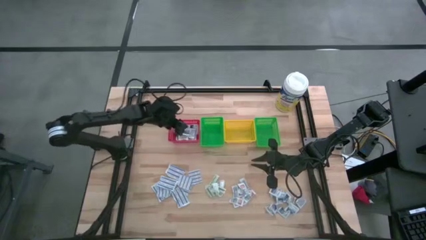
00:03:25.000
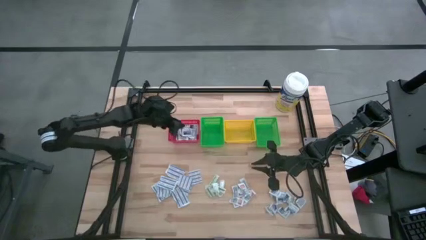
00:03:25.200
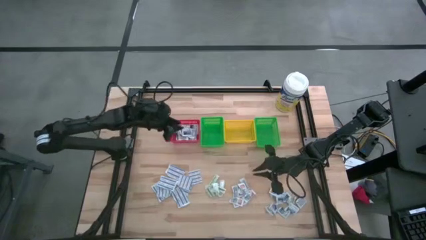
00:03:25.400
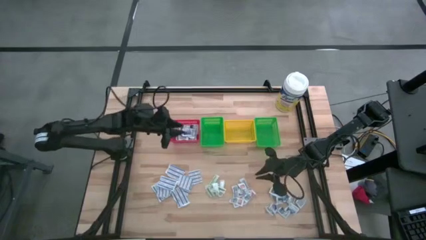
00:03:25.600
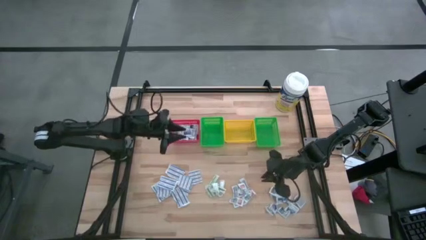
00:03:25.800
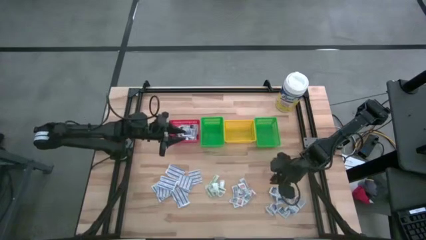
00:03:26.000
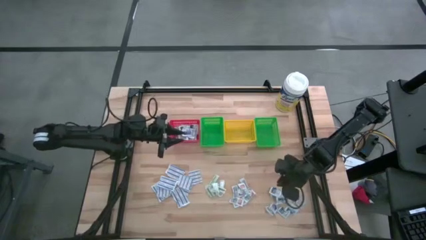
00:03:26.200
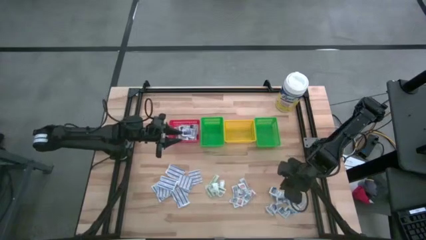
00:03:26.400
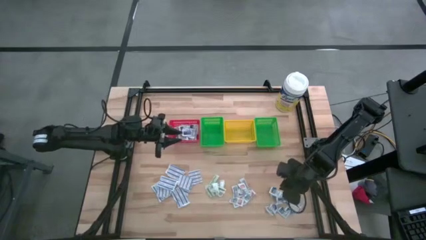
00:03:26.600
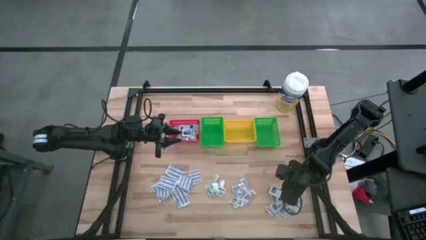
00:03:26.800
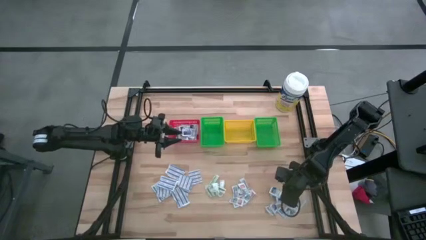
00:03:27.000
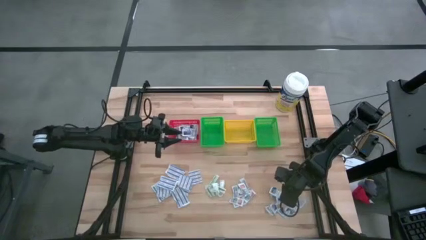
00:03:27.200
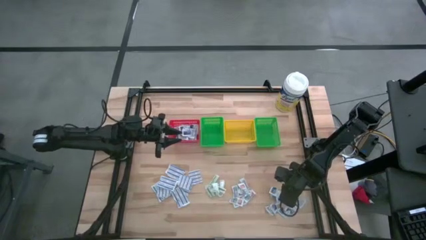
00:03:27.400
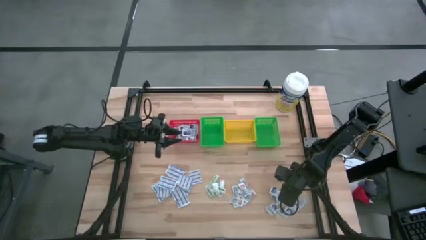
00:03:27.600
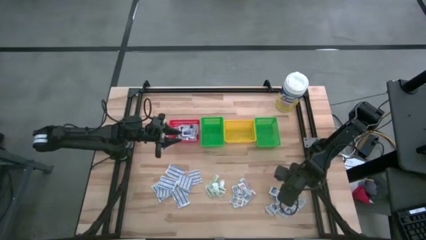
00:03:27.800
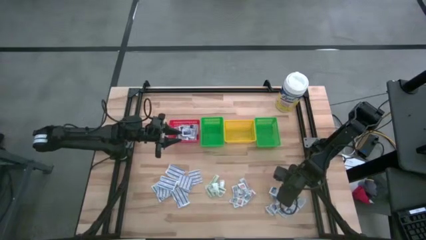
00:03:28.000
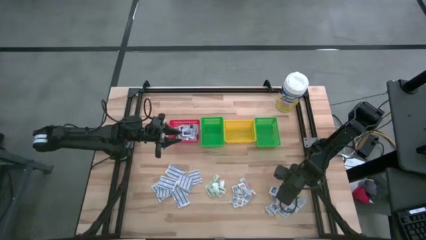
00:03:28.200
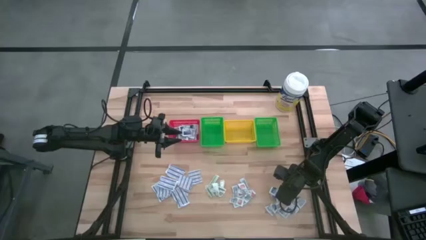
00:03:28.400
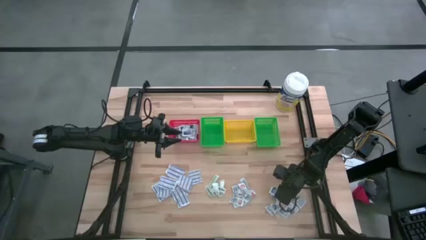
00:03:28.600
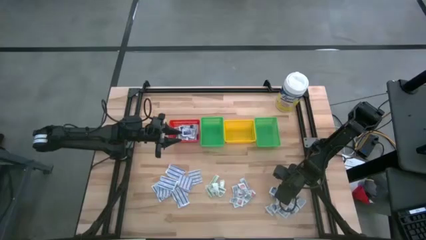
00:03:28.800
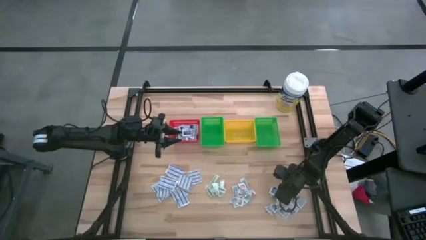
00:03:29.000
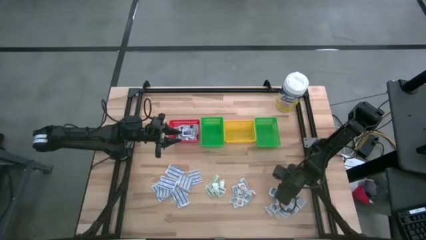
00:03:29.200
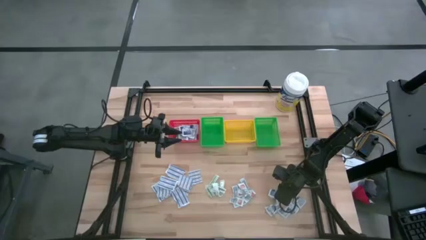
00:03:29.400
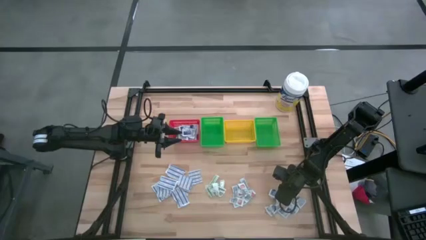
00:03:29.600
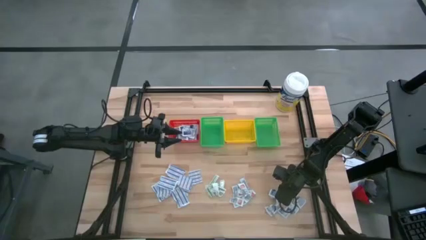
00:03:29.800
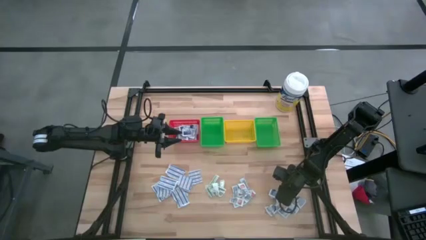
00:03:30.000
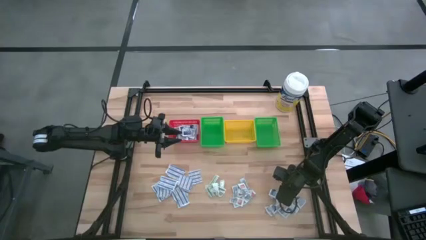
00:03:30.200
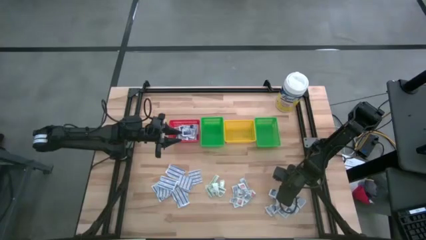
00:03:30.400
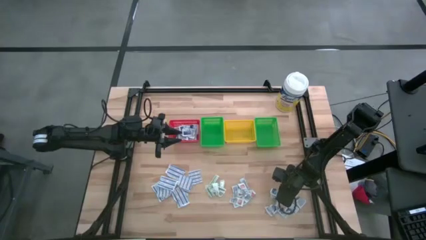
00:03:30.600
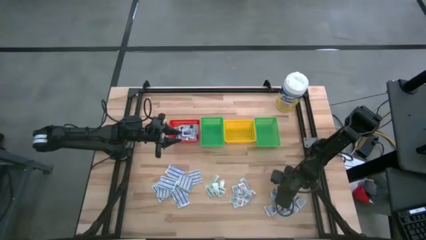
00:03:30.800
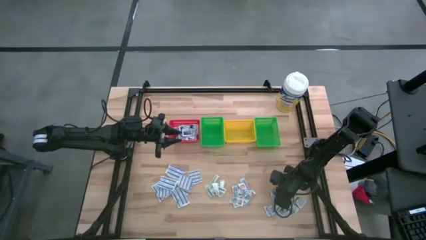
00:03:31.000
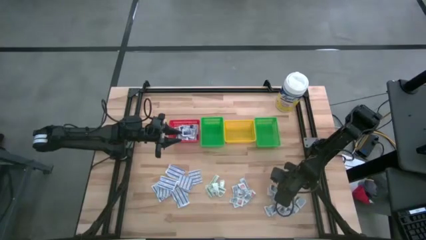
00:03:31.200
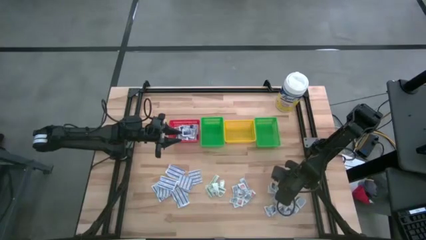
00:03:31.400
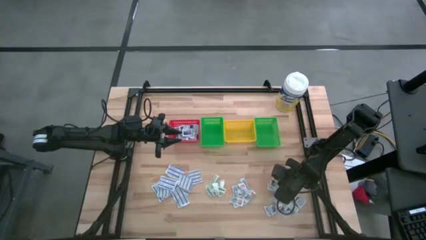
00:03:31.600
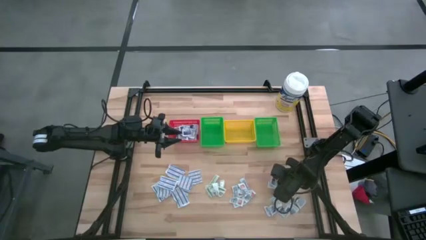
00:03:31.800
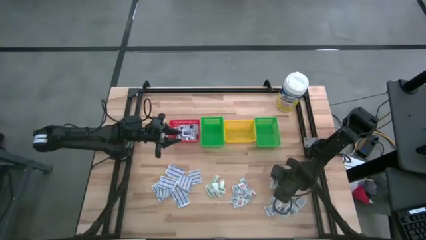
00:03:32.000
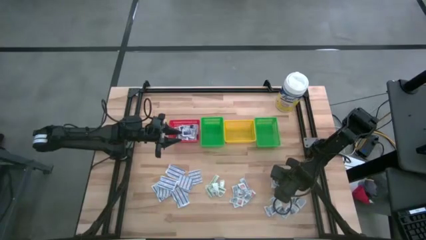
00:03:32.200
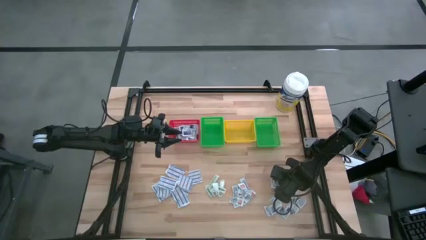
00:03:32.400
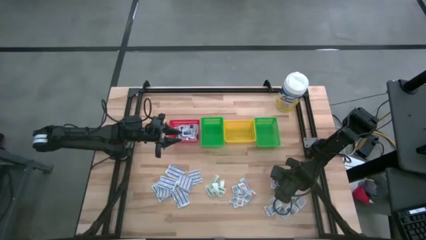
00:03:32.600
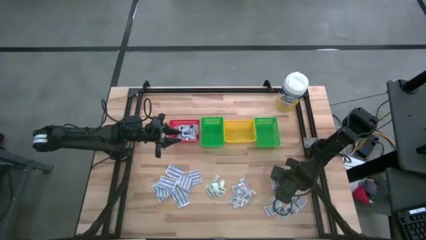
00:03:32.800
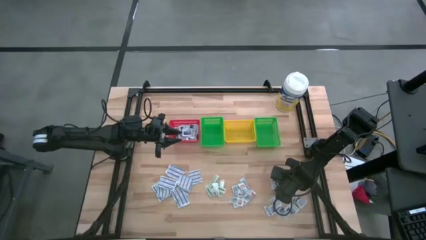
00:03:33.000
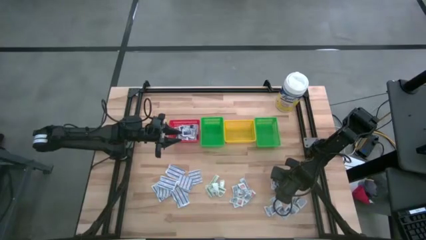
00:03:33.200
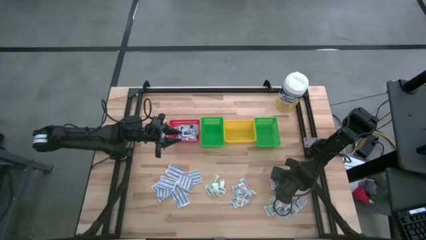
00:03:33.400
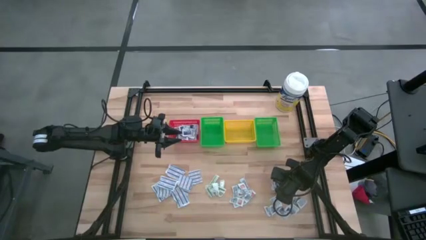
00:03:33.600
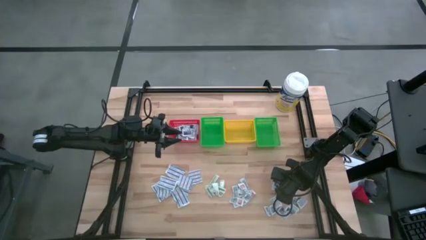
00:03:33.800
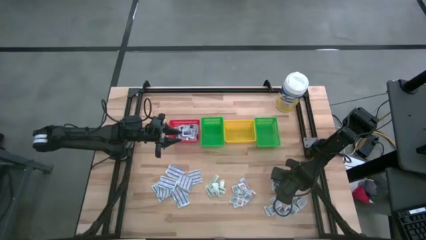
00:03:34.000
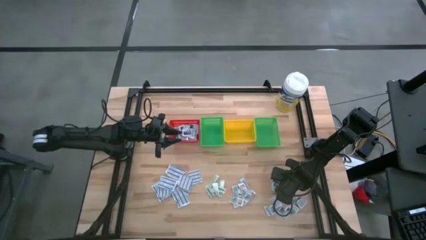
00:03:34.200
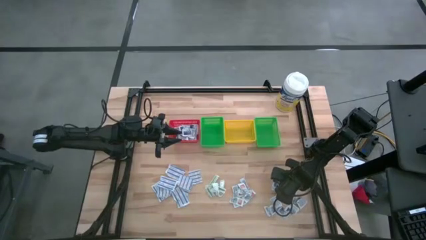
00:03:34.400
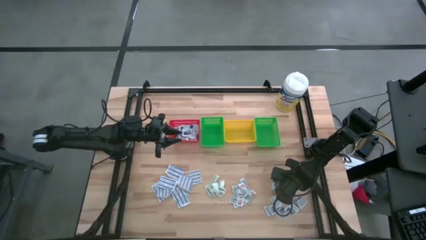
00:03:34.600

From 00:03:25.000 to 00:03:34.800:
Task: Pick & Place First Aid Supplies
Put the alcohol pad into the red basket

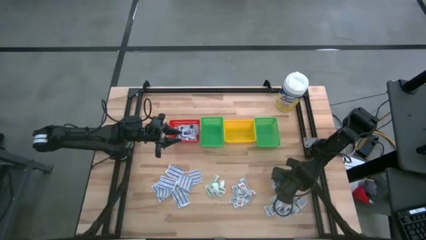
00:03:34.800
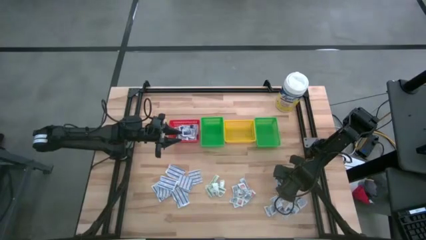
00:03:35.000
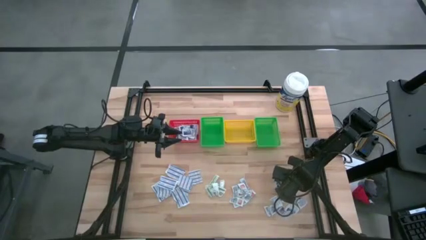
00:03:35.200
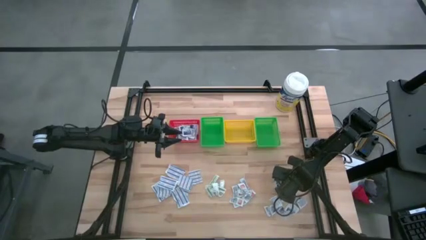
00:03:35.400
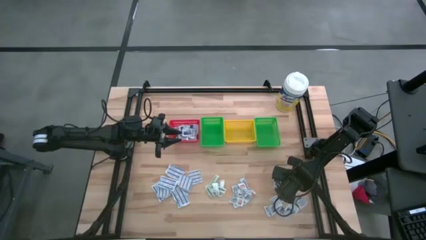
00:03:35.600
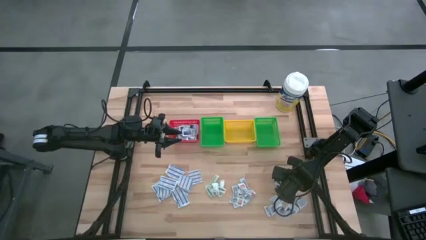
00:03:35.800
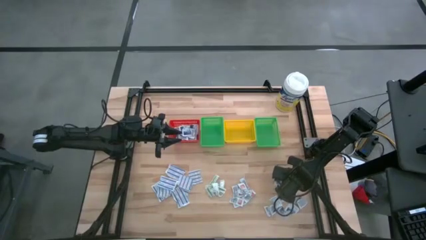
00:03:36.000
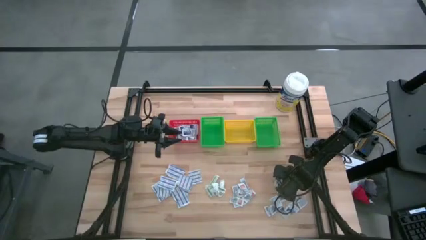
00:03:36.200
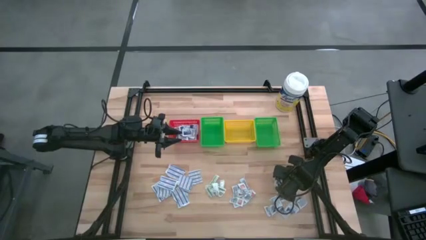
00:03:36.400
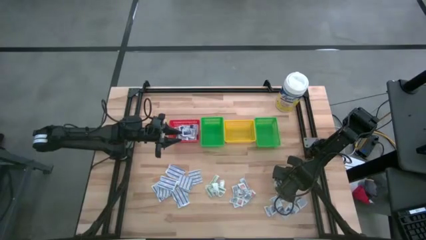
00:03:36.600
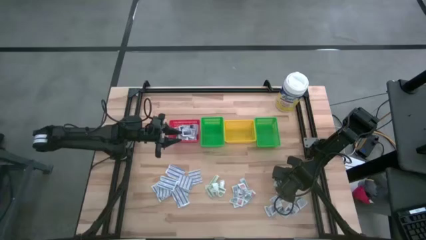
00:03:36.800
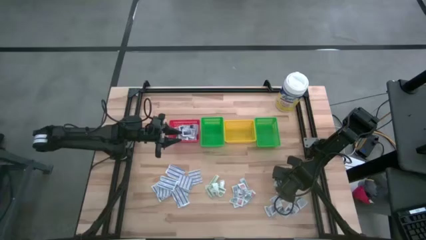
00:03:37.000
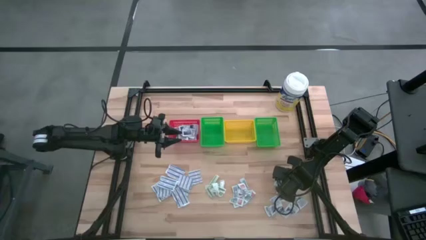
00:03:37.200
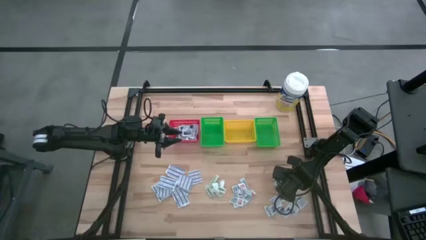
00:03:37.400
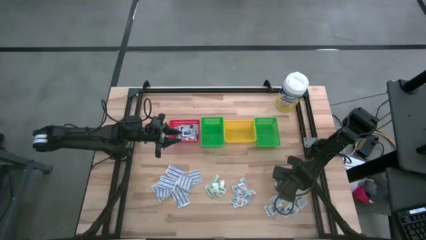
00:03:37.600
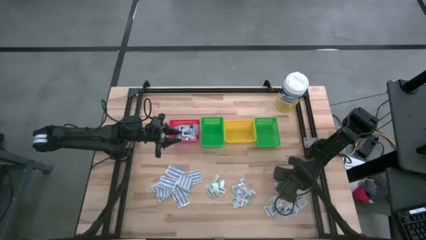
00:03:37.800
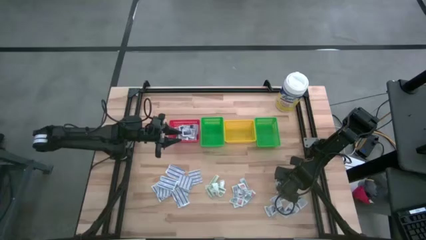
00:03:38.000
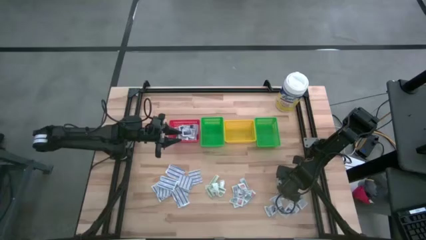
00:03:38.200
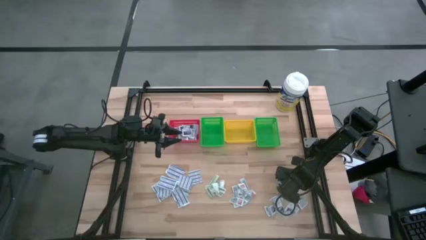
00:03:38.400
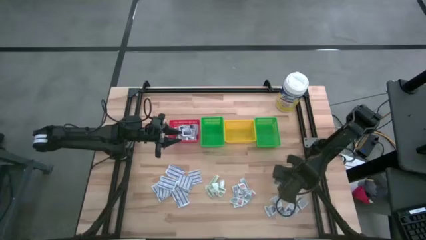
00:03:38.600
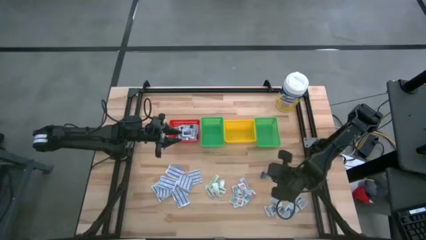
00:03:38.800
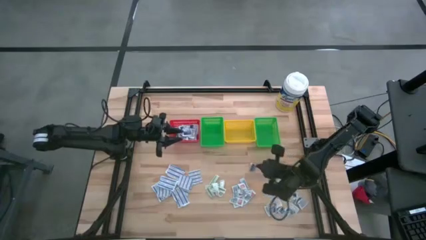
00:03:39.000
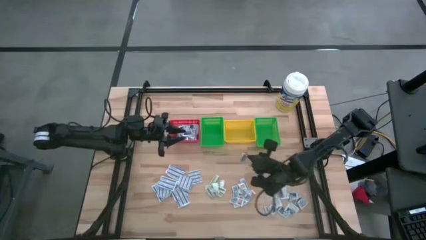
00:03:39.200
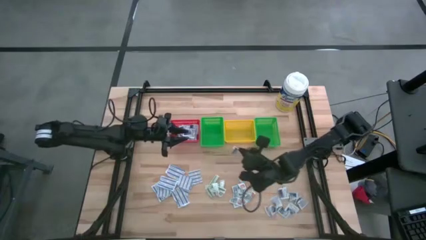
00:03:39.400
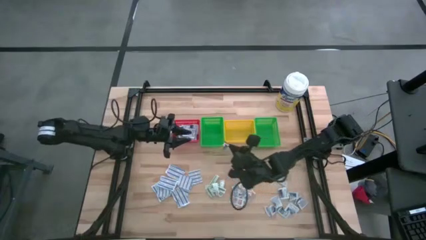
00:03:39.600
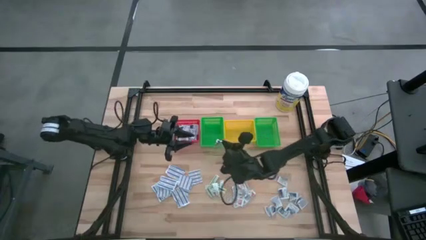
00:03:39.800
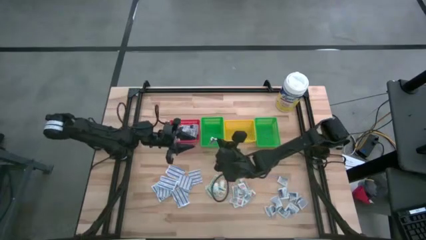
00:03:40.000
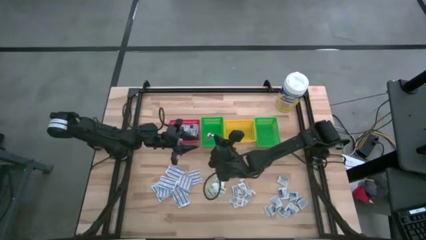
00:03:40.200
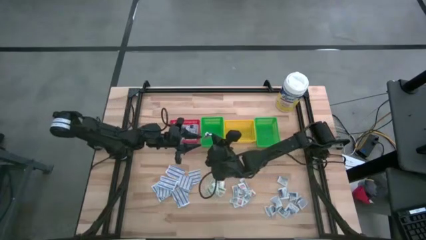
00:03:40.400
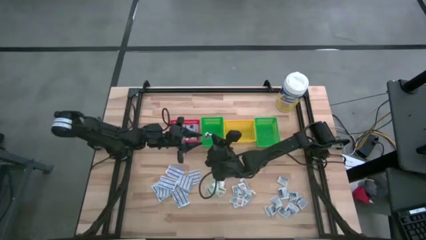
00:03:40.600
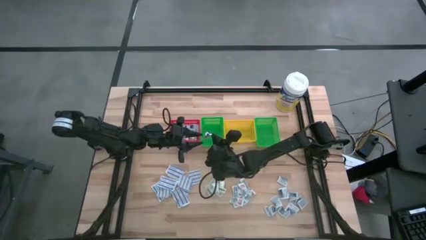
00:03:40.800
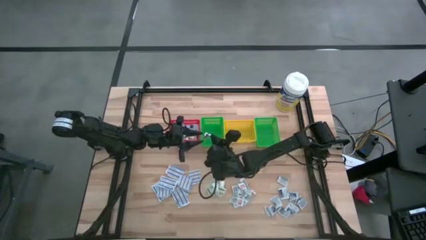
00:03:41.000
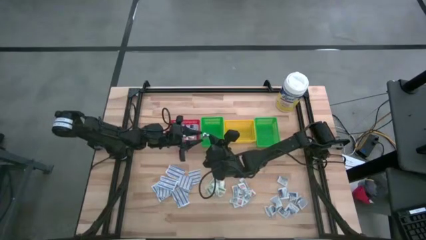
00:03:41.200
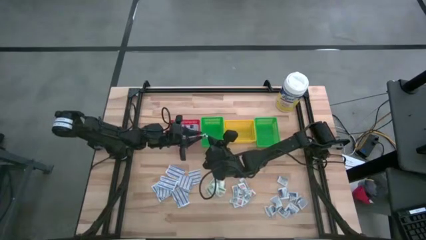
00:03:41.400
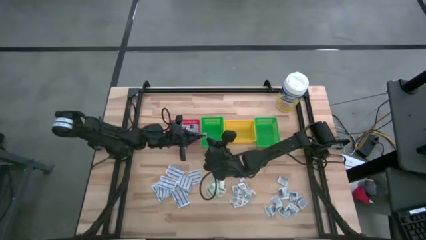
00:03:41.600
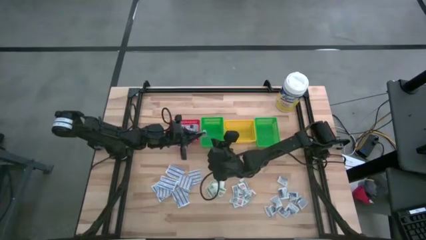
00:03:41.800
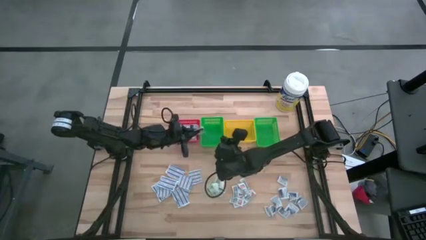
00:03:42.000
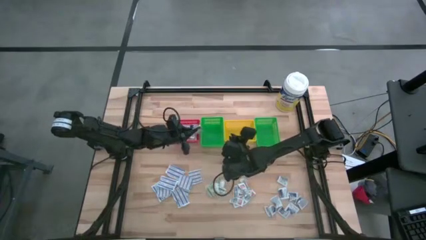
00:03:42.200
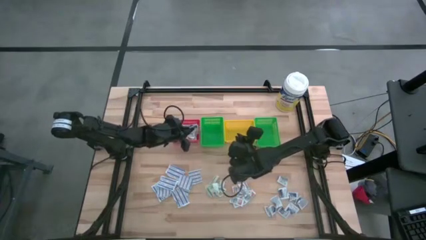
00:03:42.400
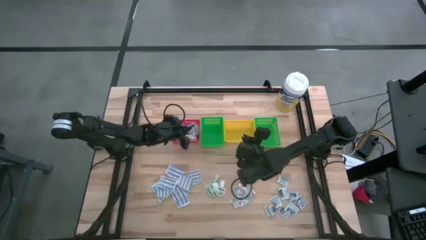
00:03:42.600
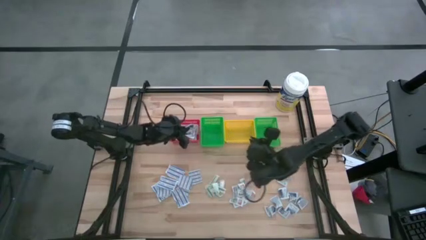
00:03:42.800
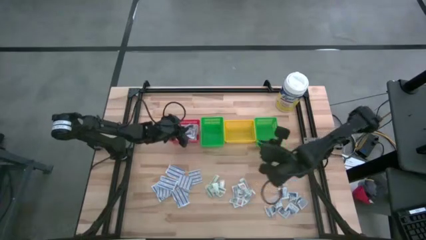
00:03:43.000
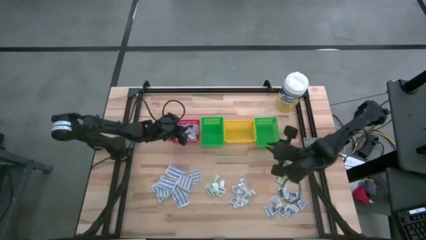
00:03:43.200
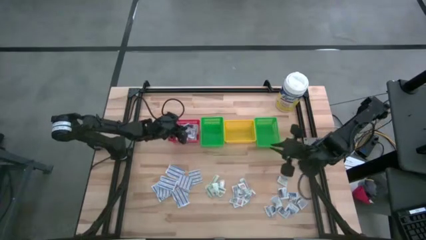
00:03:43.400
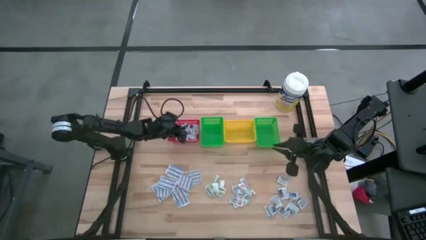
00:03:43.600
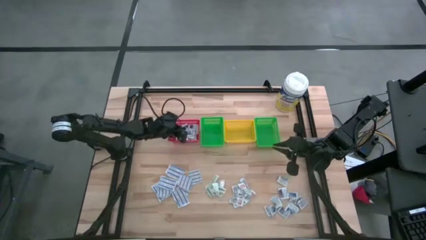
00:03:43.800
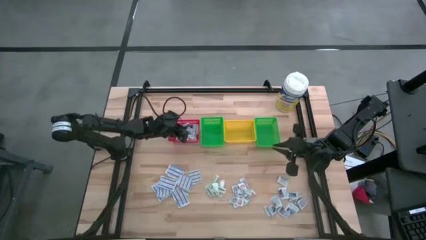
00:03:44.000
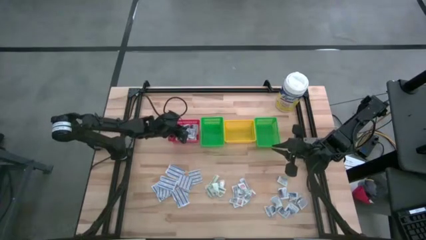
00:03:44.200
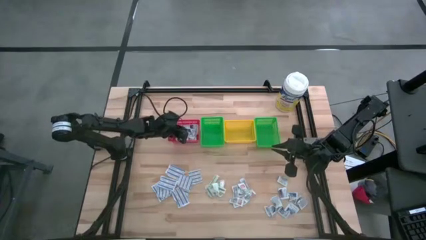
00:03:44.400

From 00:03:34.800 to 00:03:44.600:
Put the alcohol pad into the red basket
